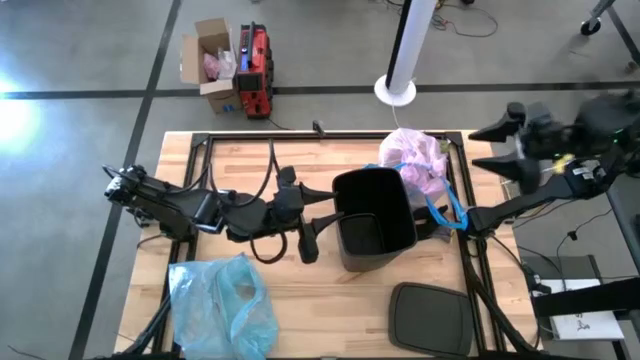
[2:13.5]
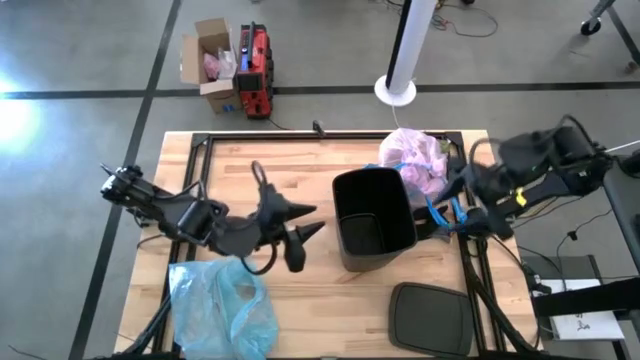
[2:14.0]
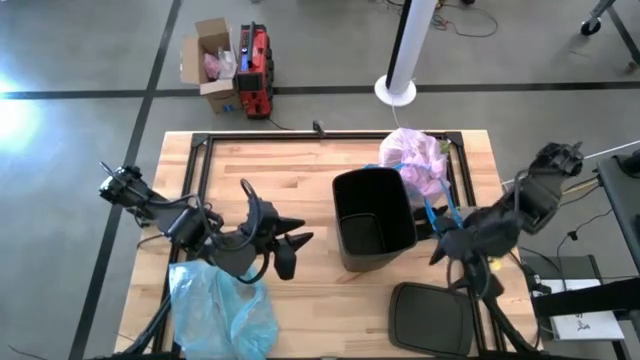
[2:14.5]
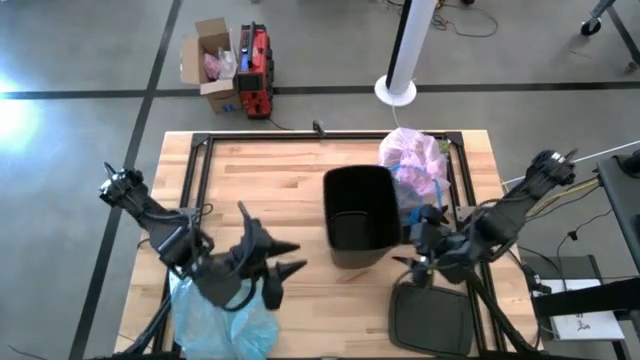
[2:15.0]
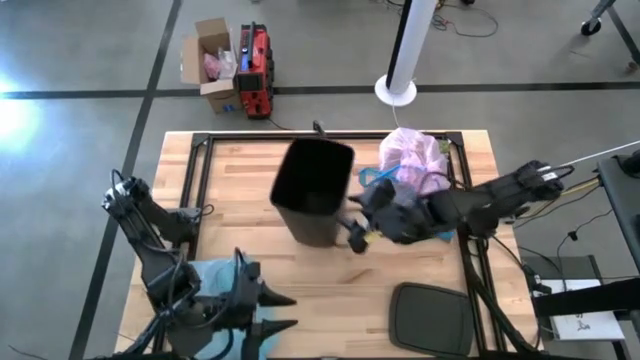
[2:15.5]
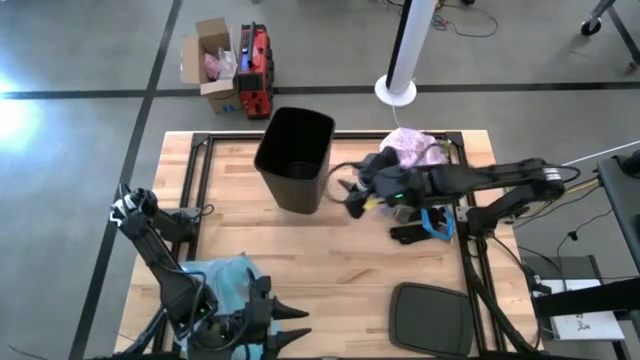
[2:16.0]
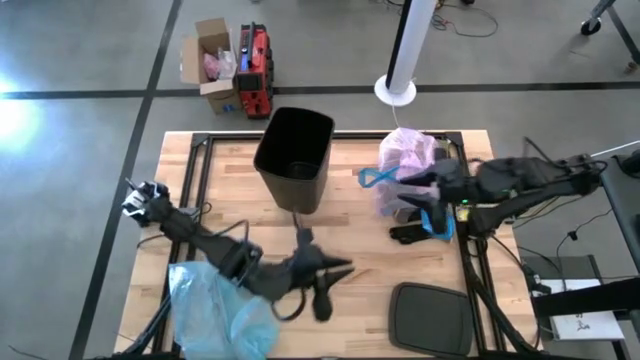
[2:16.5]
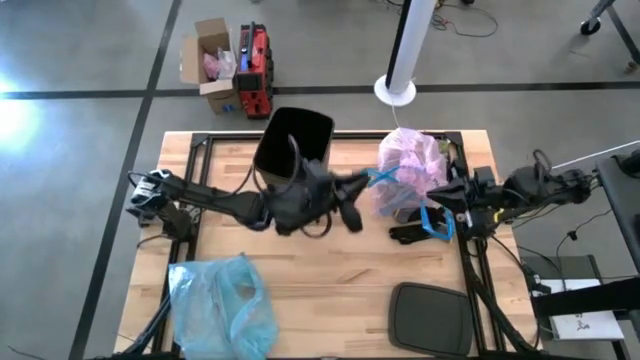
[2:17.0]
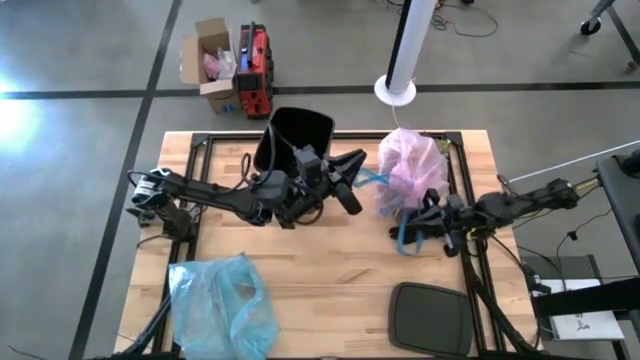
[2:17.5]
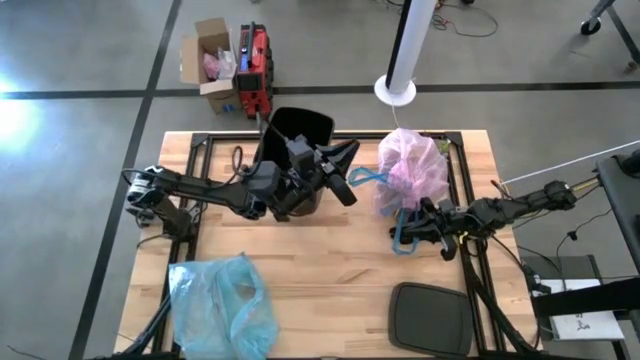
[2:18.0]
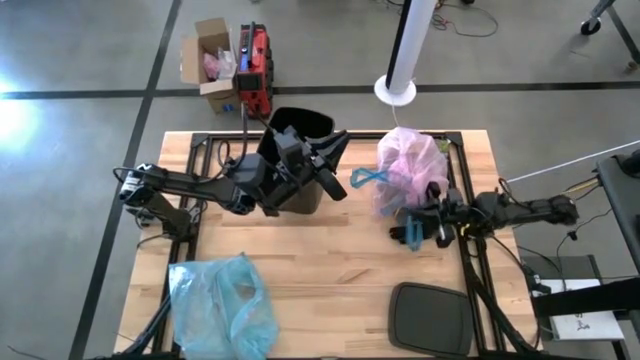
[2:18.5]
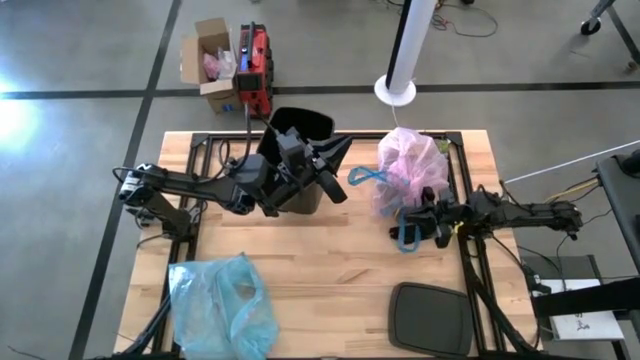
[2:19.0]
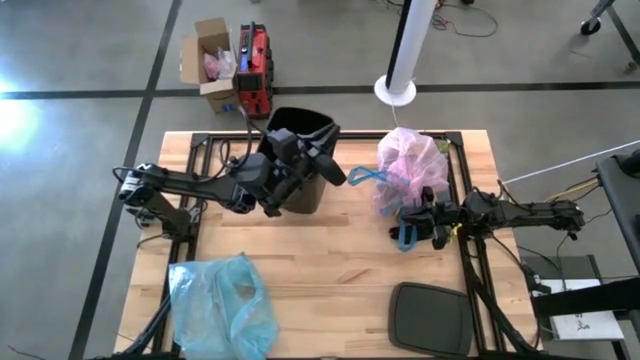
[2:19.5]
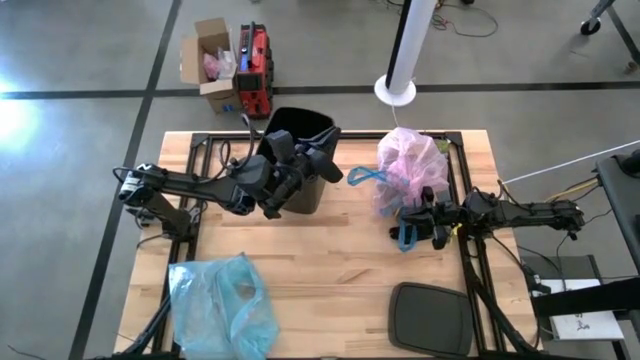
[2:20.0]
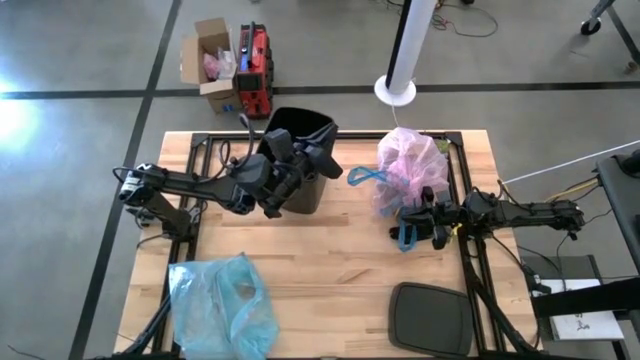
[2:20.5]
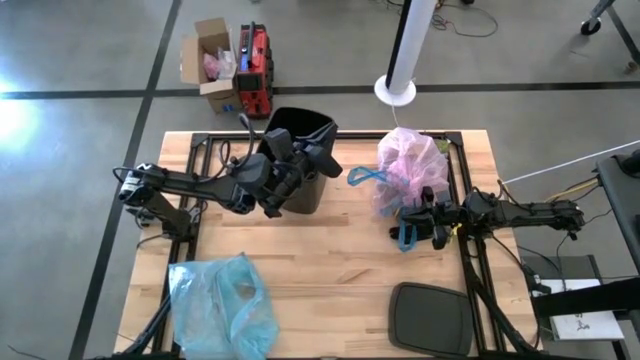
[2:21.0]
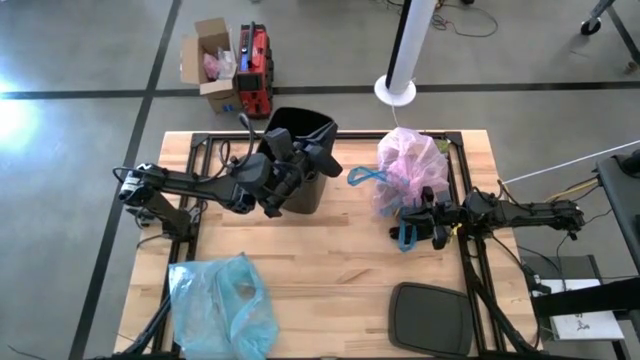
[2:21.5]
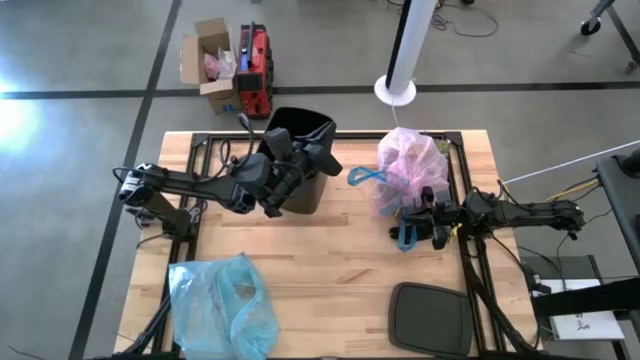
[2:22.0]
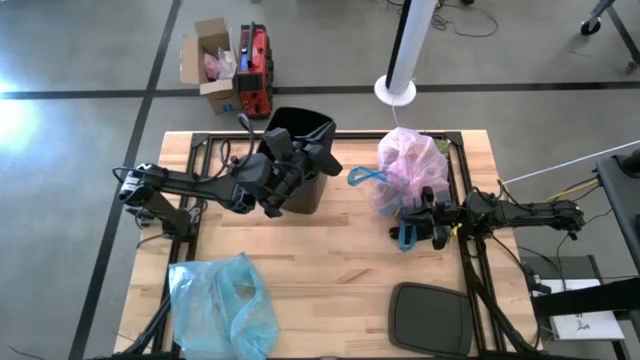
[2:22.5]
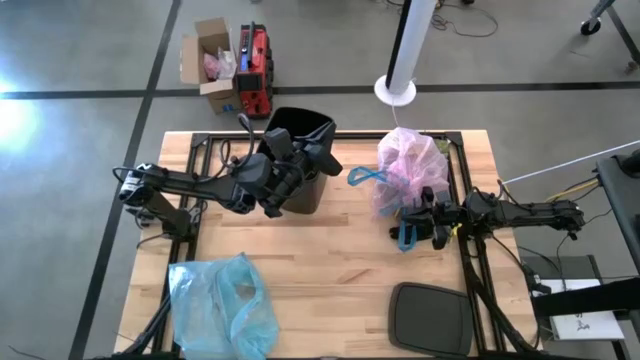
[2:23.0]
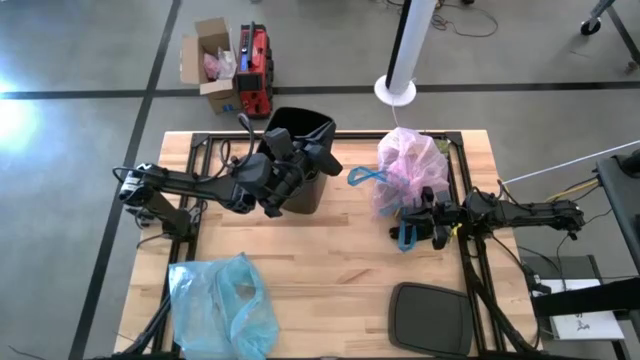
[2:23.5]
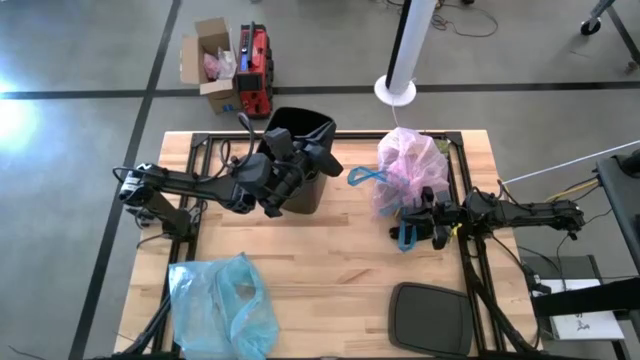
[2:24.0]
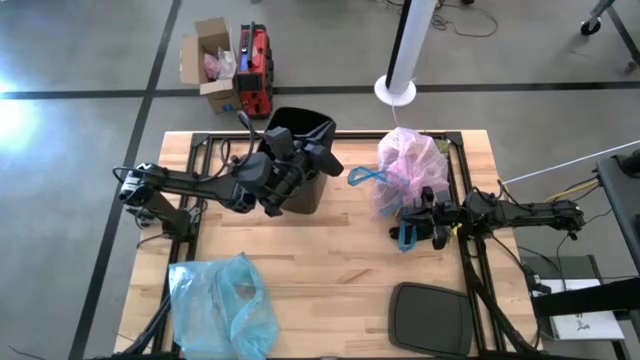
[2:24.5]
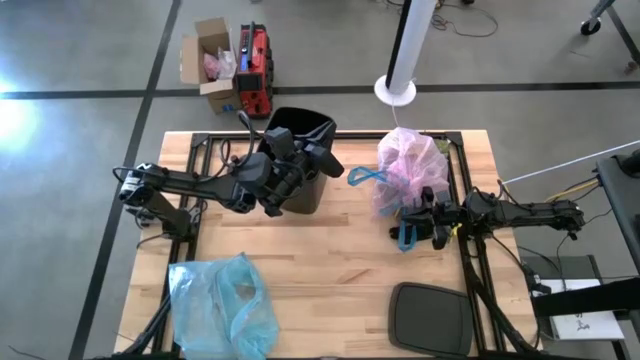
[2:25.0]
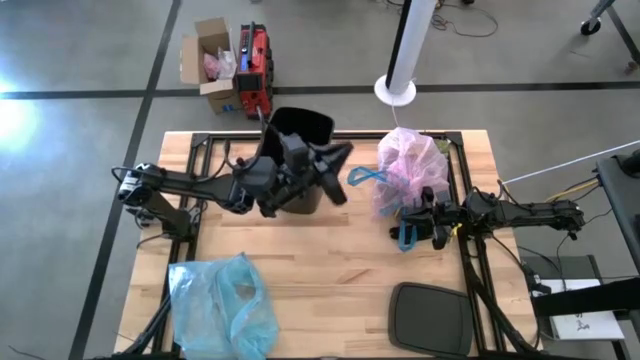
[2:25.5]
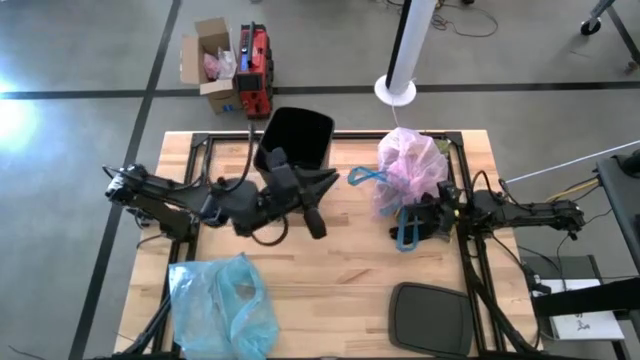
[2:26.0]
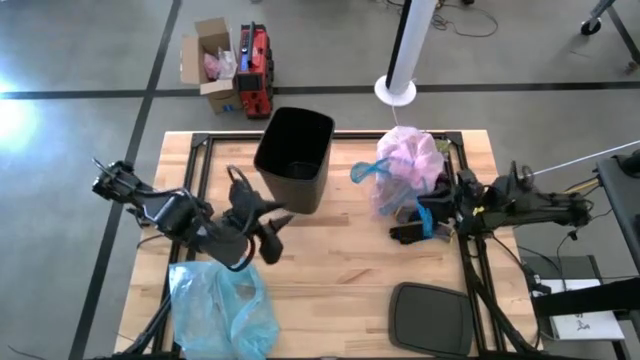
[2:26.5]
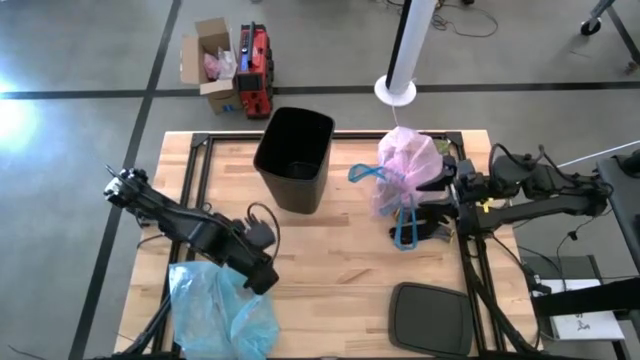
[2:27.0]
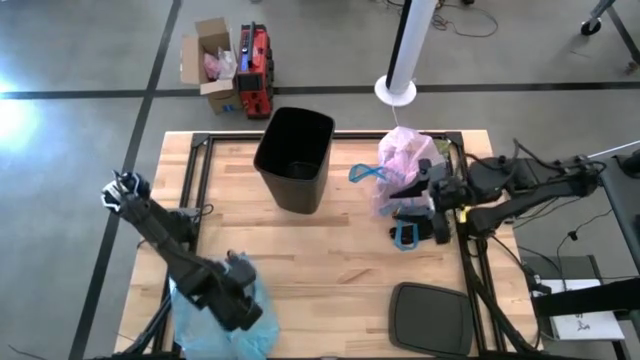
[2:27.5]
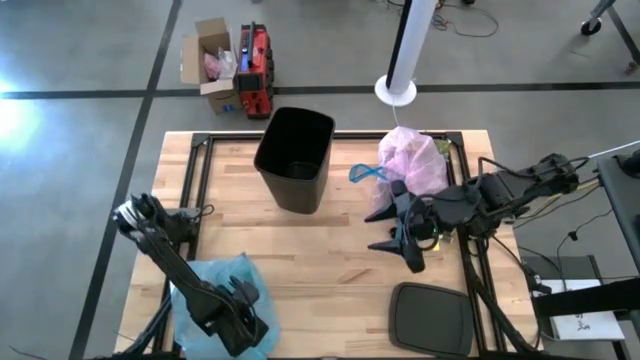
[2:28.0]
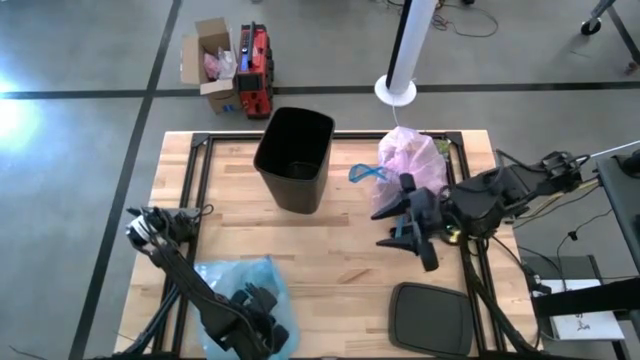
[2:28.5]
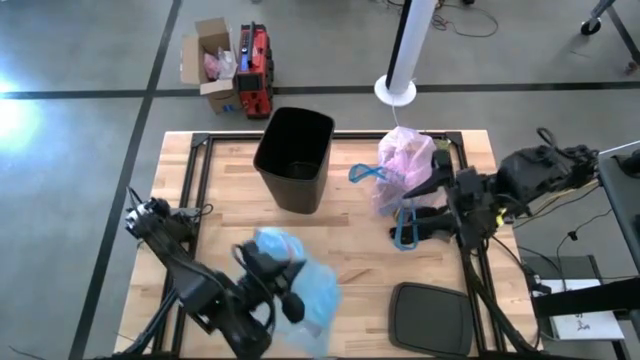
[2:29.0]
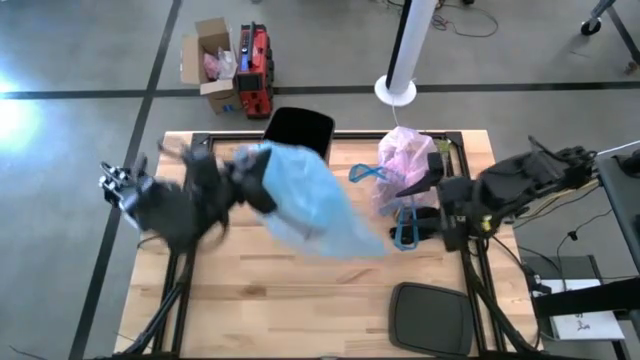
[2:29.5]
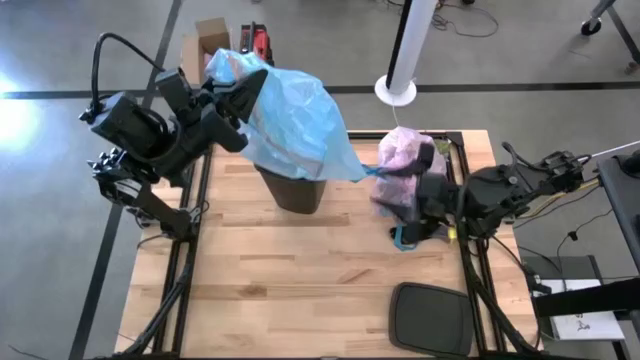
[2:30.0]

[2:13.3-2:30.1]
Task: place trash/remove bag and relplace
Insert the new blue trash bag into the trash bin

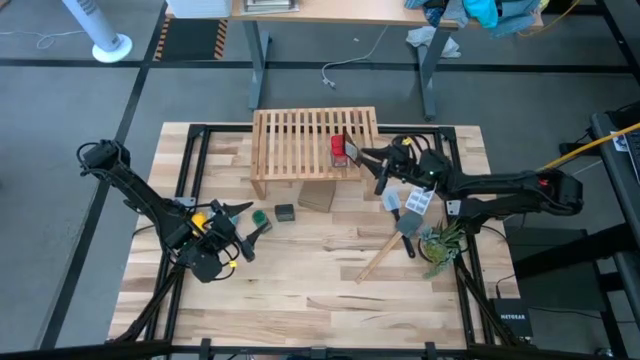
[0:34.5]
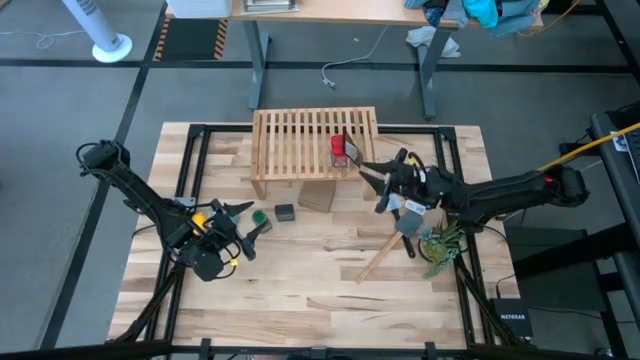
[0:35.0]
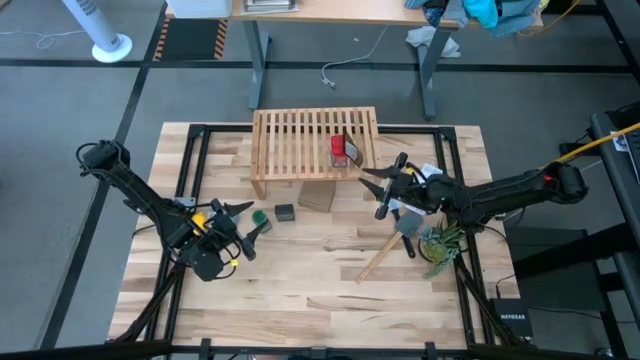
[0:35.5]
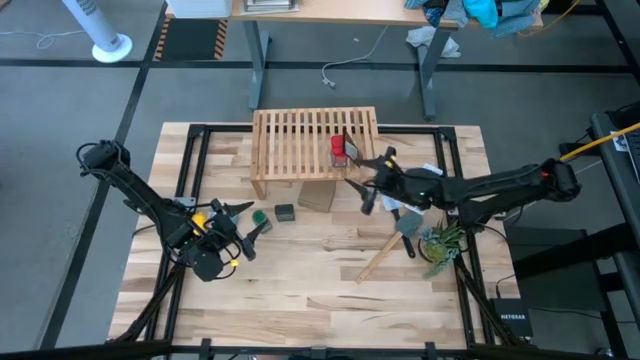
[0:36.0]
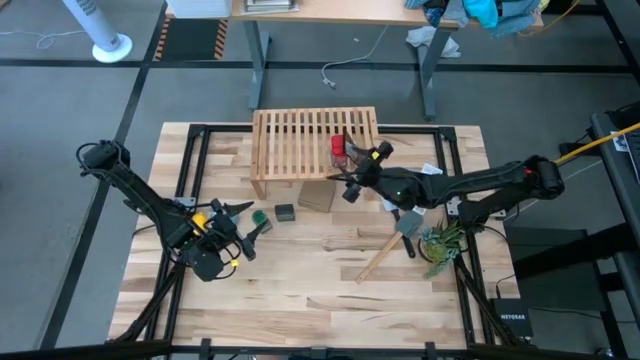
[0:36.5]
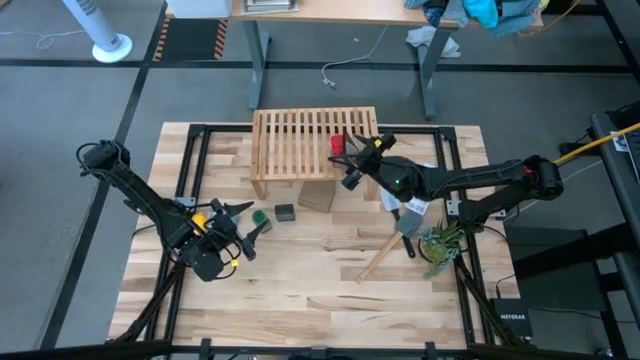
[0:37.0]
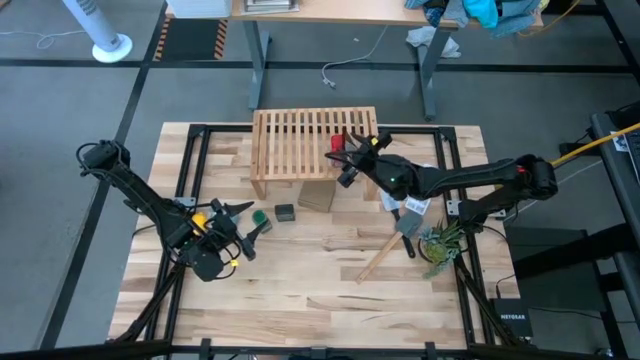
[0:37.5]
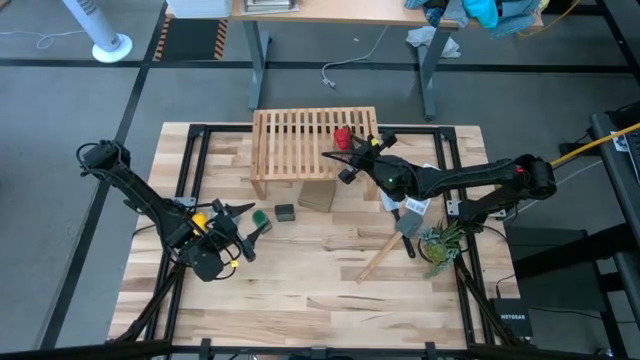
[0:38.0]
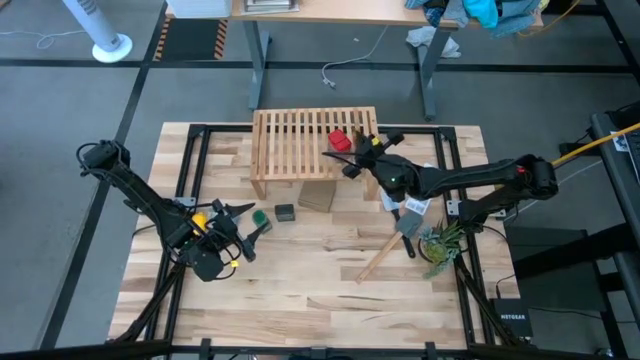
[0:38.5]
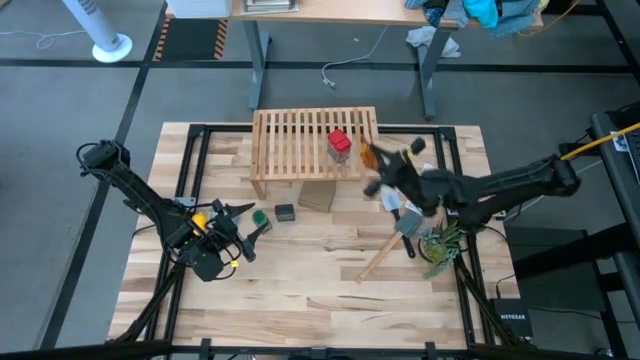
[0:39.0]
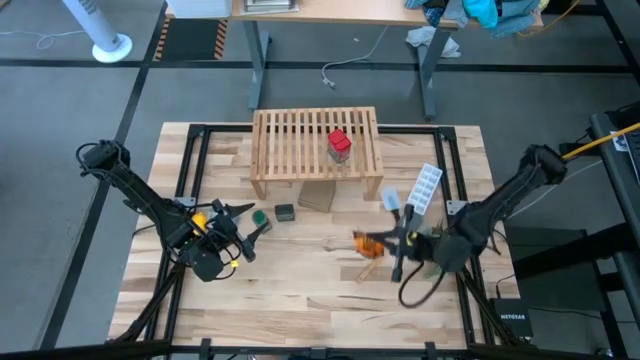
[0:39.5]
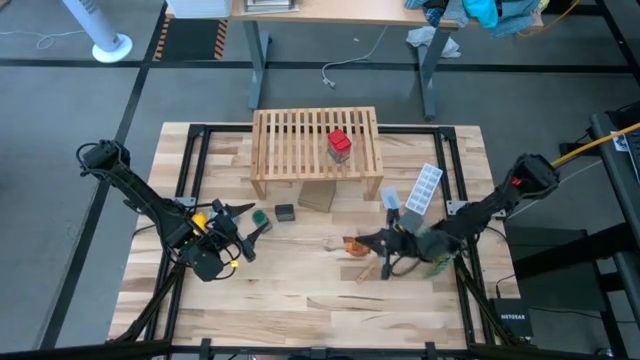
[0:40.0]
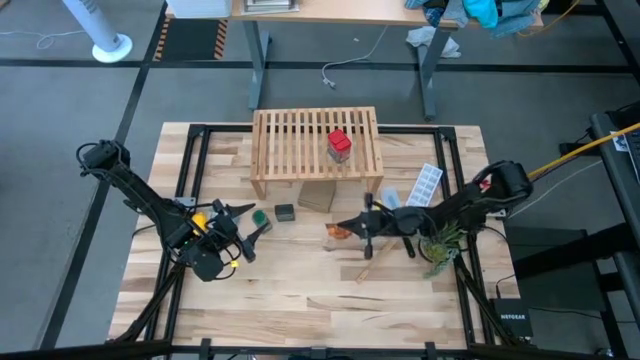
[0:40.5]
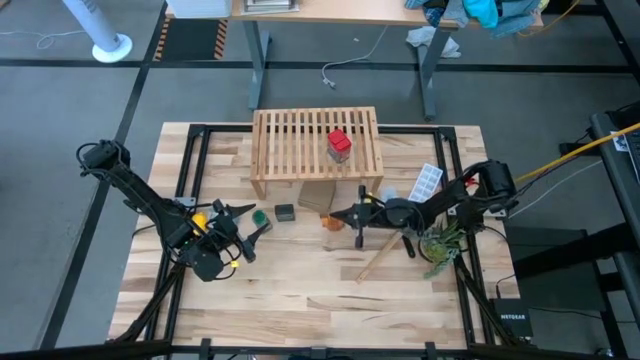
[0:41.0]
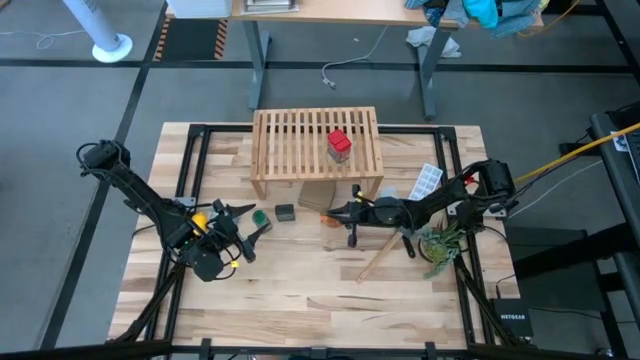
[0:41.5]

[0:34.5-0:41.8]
Task: Shelf spices
Remove the orange seasoning pack from the shelf
